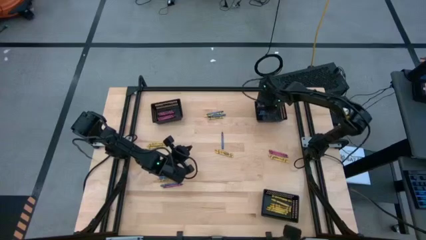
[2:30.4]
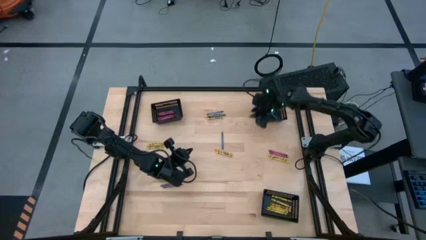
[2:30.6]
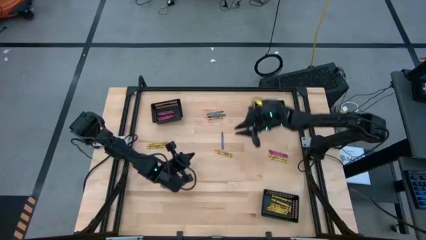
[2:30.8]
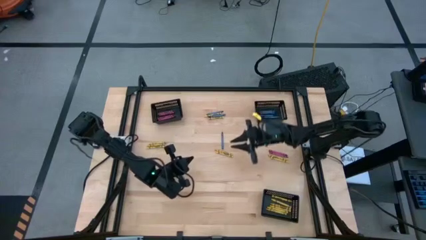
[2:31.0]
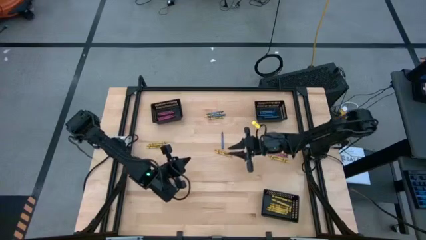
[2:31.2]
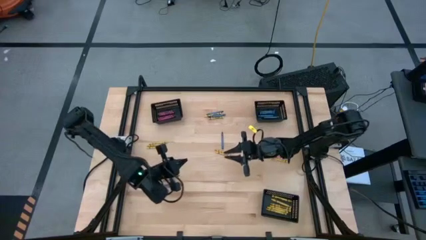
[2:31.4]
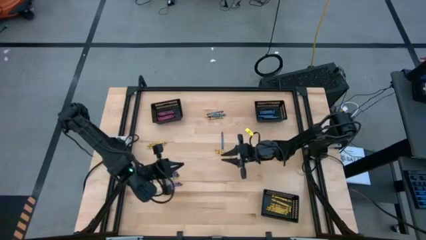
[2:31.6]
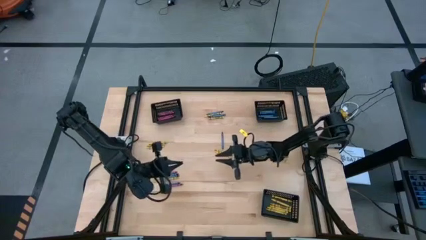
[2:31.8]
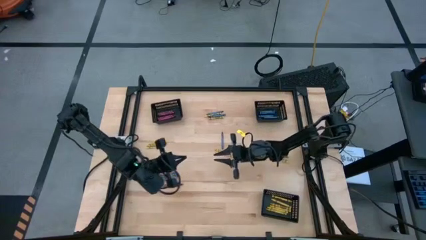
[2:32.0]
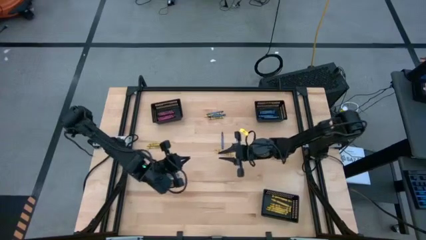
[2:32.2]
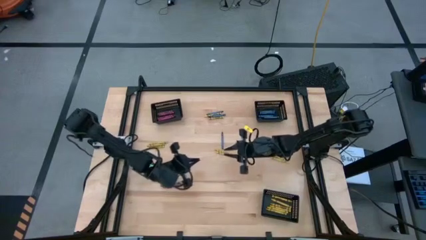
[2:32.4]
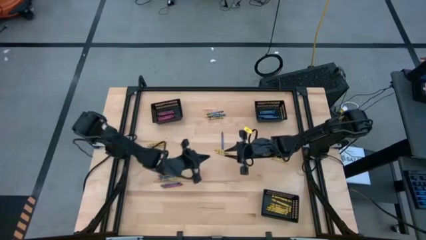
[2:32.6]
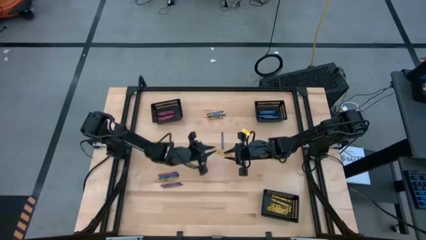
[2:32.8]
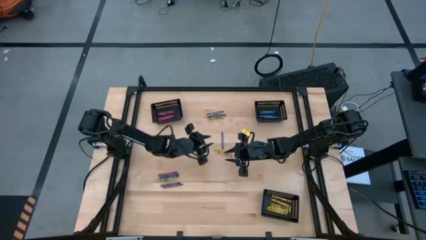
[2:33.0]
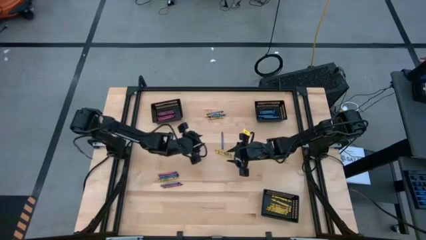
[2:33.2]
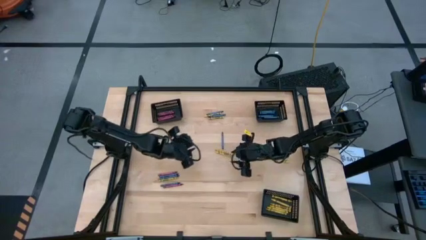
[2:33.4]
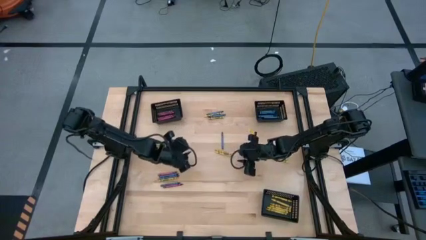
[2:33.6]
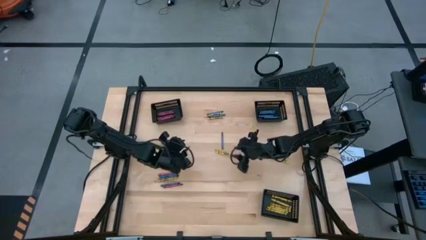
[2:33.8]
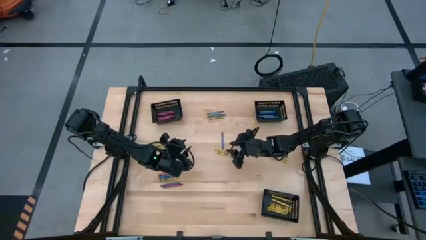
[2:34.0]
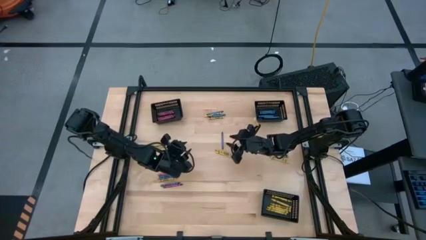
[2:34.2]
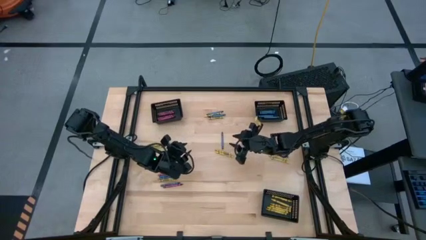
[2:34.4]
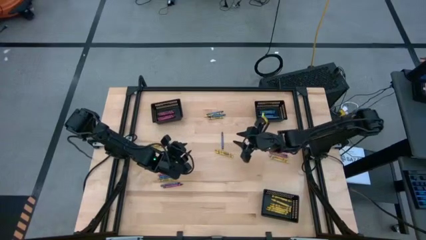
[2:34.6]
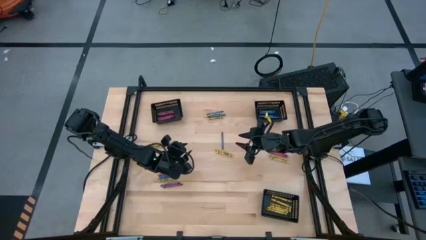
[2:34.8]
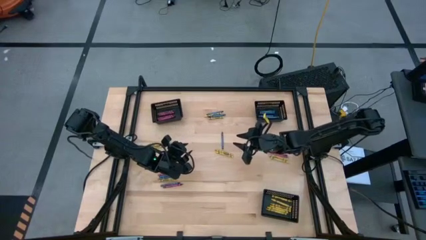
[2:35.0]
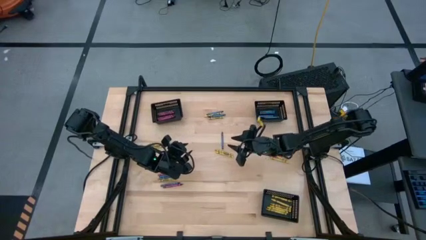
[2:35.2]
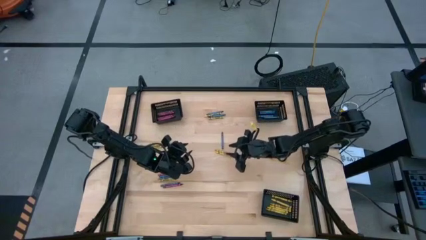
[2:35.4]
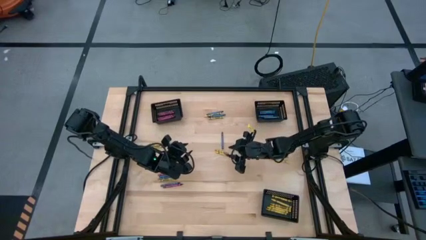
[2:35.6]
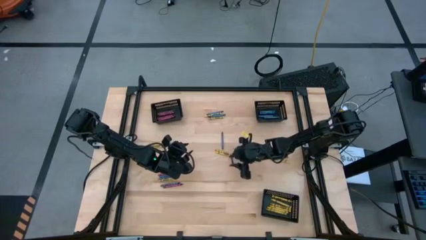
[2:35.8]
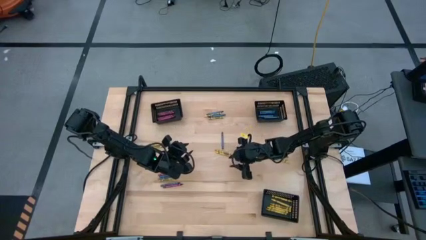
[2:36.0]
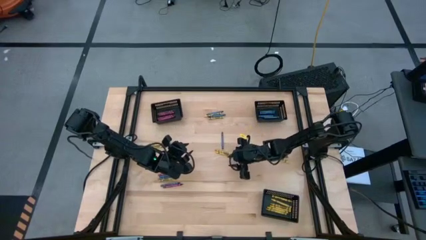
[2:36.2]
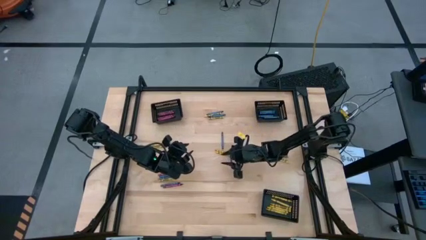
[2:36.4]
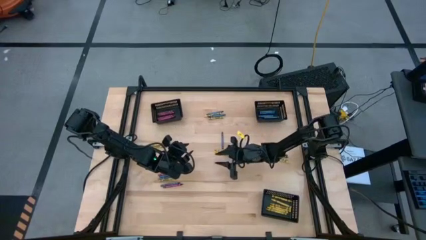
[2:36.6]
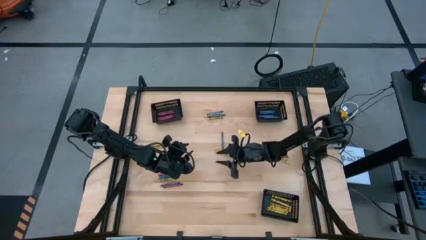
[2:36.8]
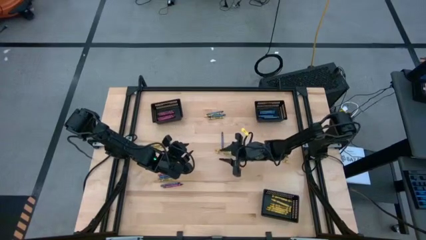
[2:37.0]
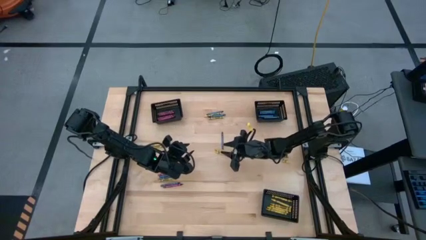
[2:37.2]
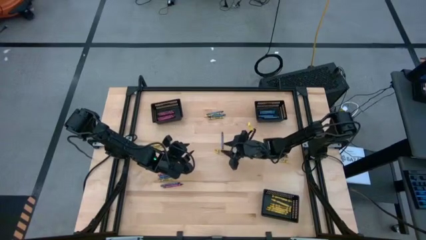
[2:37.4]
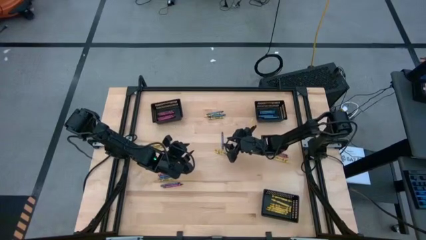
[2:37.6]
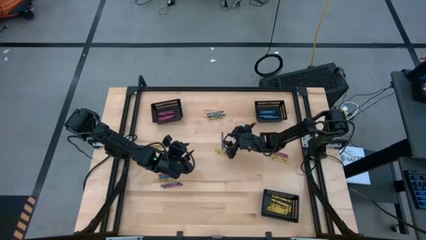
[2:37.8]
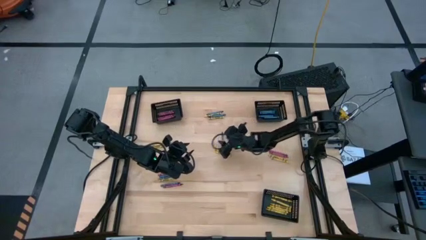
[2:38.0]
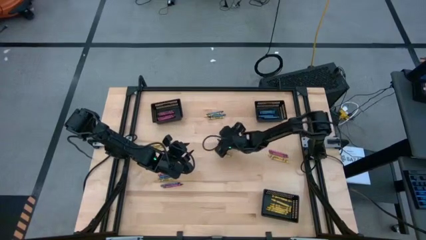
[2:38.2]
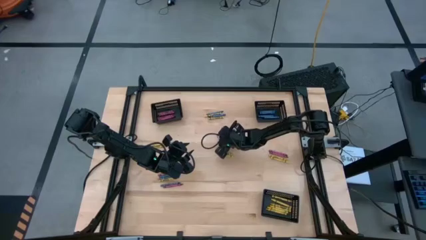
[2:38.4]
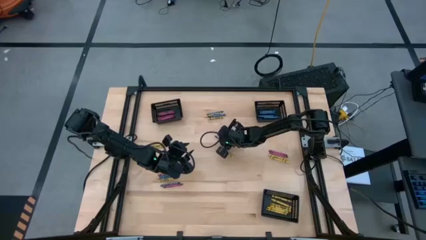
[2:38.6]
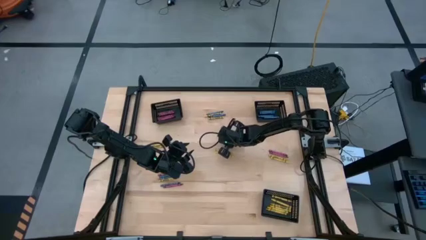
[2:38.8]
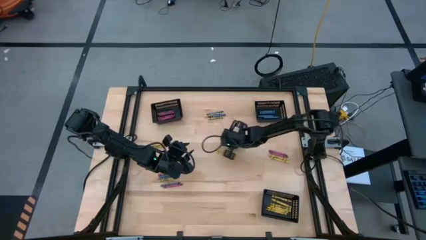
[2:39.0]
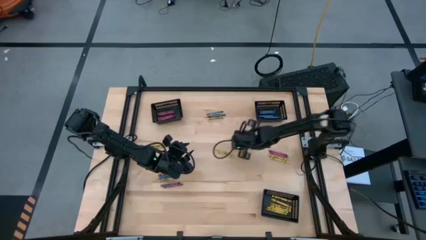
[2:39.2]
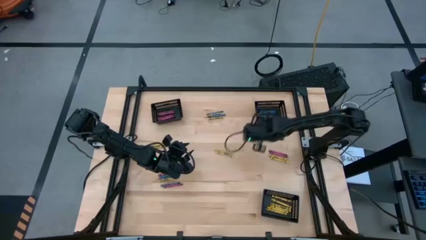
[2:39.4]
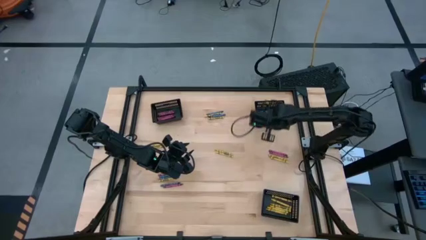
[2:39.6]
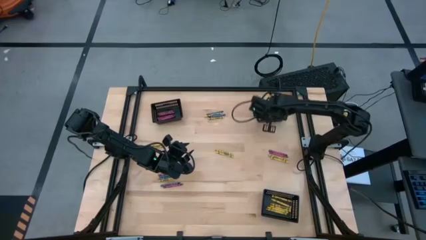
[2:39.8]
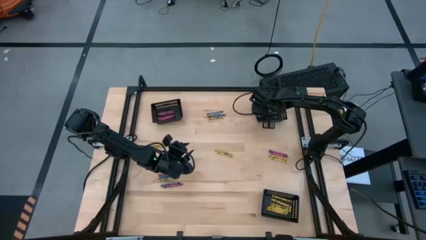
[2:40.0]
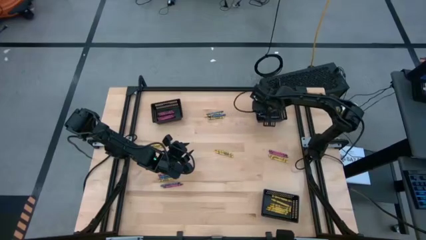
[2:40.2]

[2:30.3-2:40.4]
Task: Sort crayons
Put the blue crayon into the top right black bin
